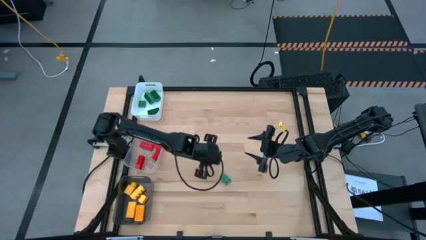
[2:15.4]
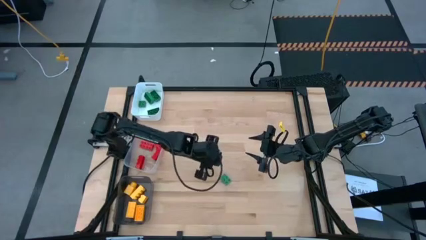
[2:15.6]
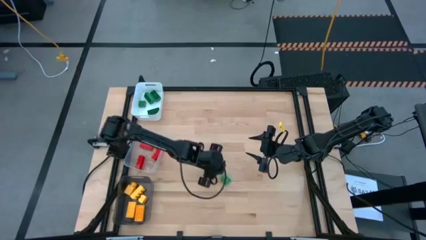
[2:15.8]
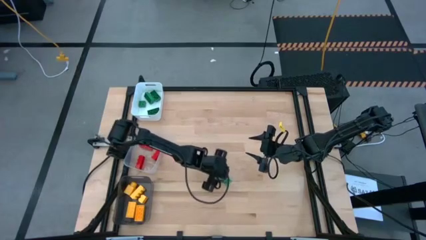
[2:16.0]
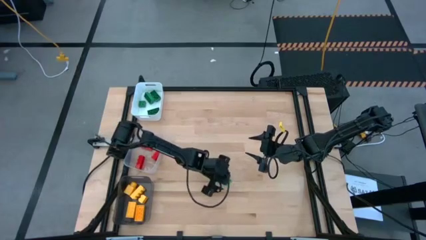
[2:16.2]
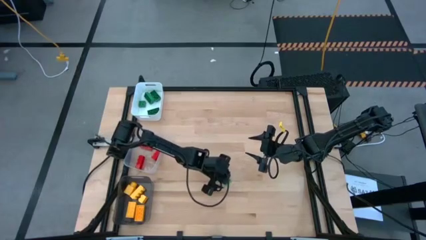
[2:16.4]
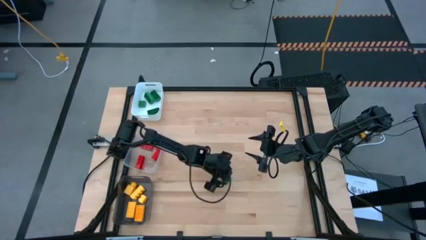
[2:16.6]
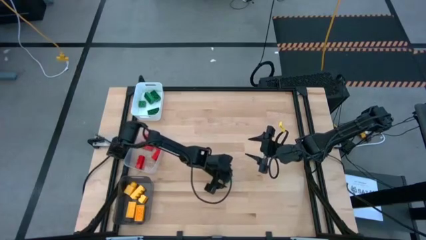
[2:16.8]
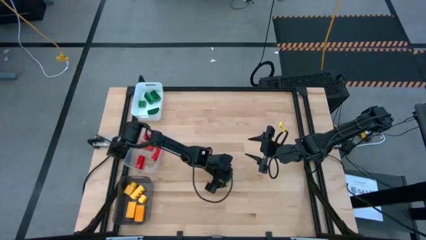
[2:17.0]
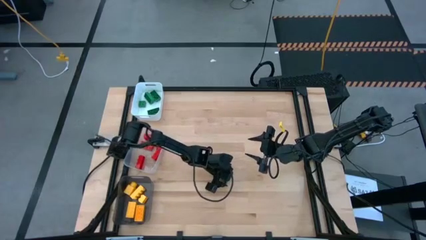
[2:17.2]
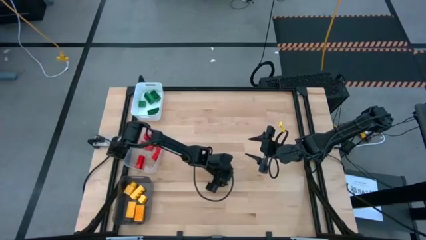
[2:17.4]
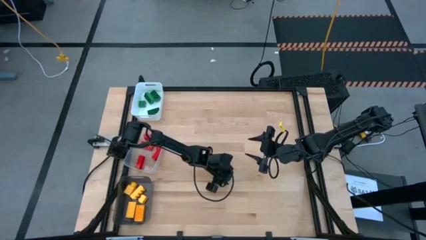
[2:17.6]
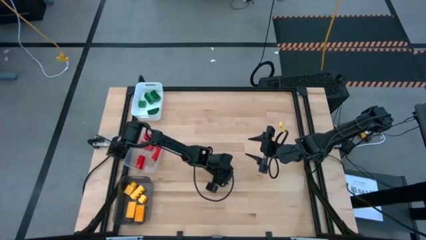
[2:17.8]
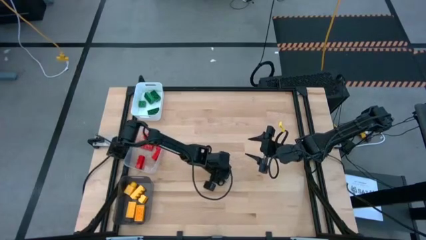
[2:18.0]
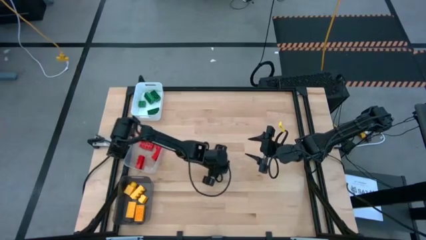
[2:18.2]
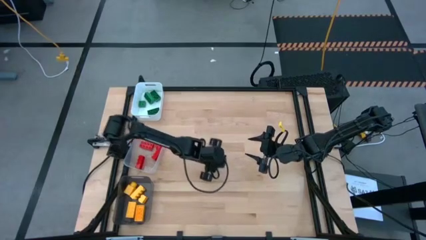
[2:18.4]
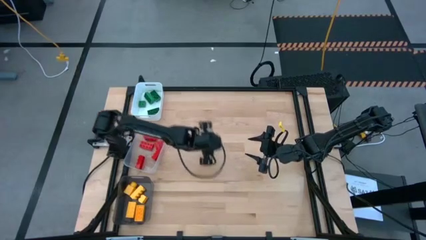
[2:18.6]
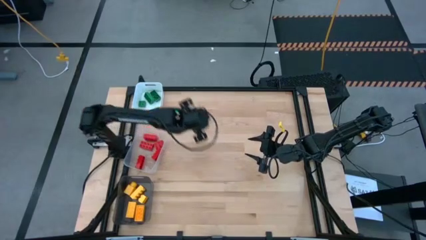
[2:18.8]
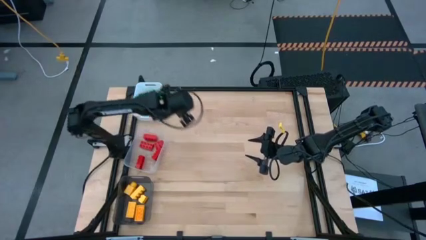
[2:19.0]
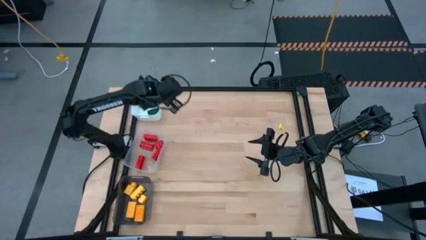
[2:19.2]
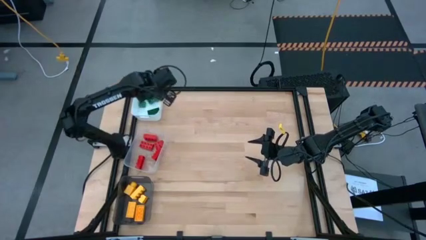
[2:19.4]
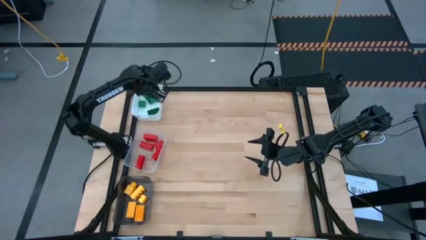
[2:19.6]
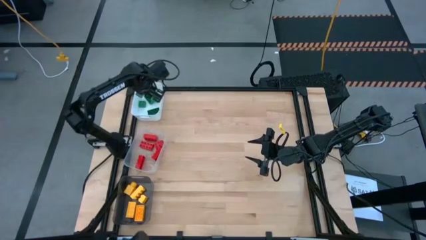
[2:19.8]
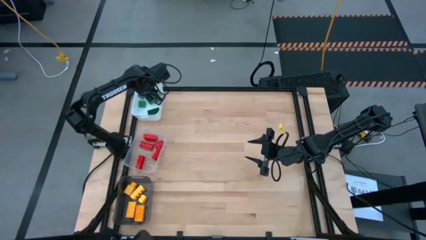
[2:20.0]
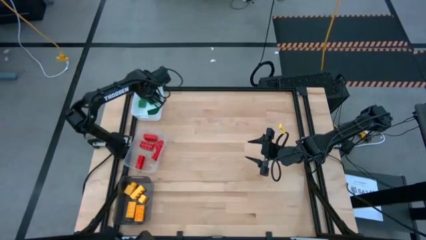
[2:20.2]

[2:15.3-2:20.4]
Task: Sort & place blocks by color
Put the green game piece into the white bin

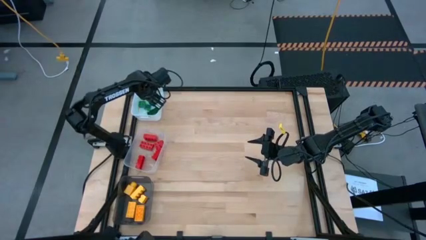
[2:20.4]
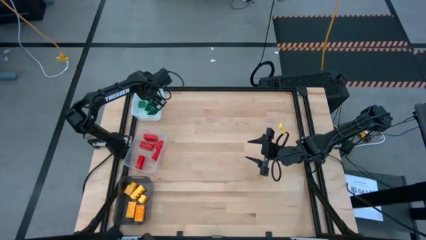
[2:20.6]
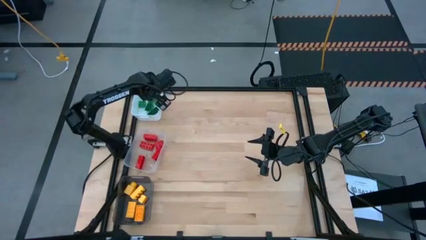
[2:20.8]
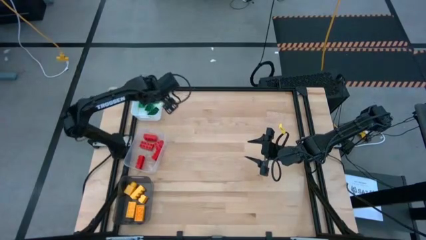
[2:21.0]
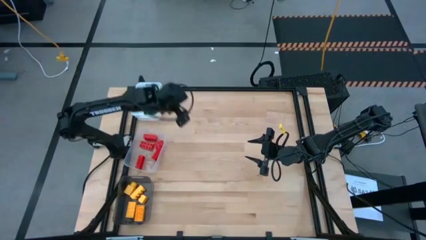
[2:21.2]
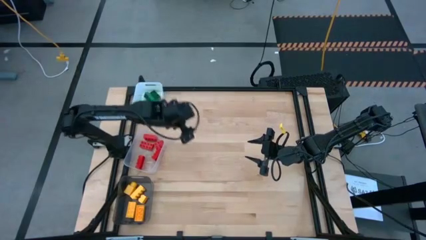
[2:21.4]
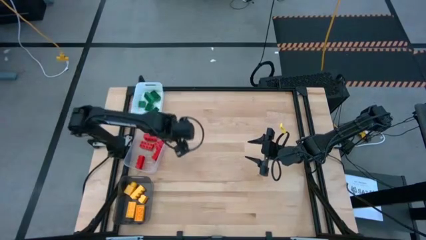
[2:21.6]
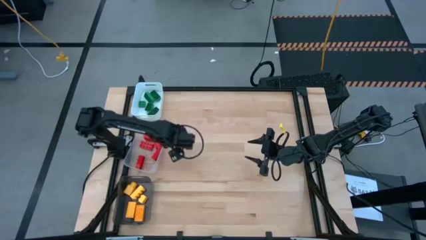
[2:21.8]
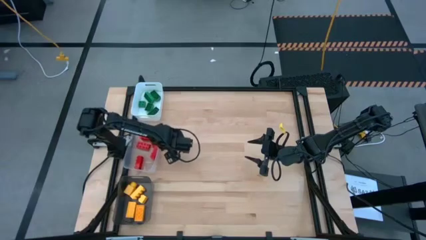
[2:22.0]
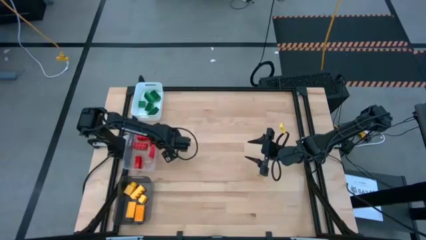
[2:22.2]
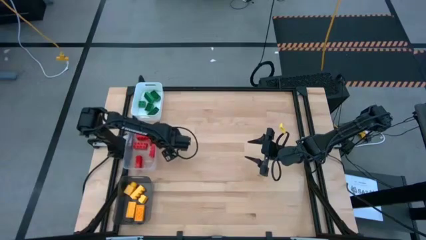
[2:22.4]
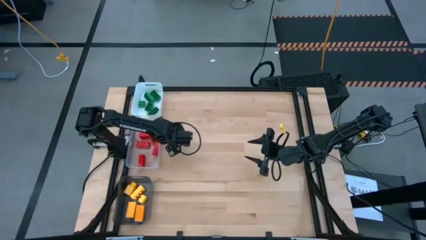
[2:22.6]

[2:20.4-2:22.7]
Adjust the transparent bin

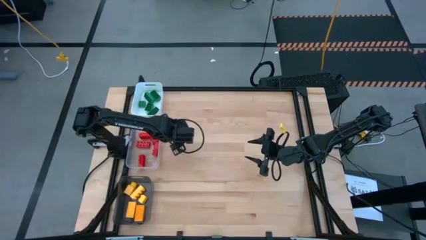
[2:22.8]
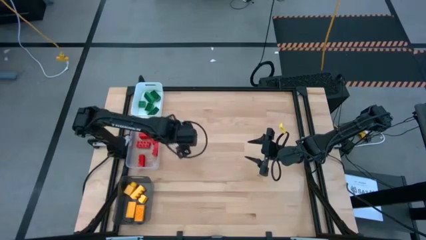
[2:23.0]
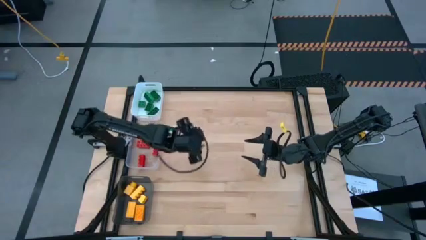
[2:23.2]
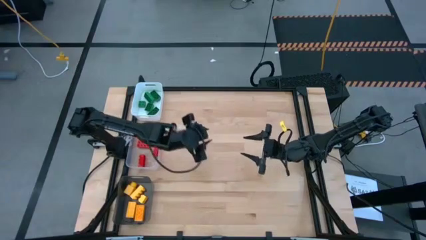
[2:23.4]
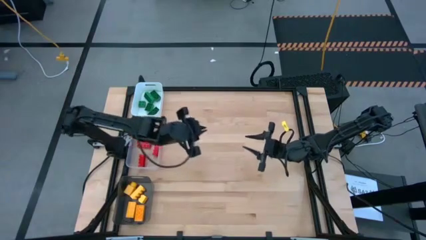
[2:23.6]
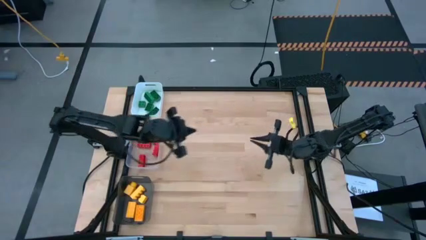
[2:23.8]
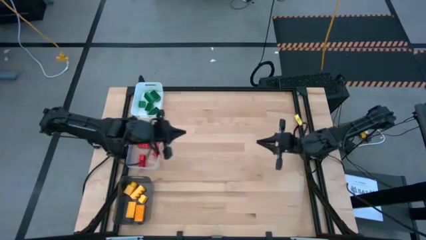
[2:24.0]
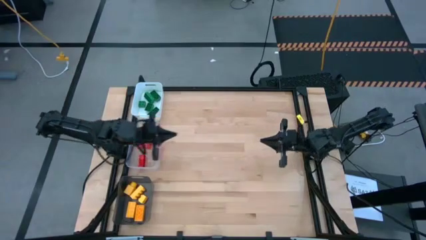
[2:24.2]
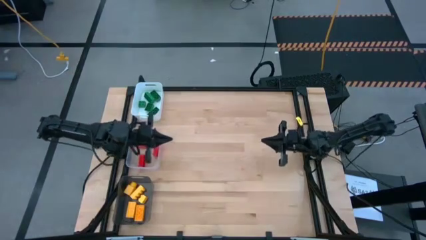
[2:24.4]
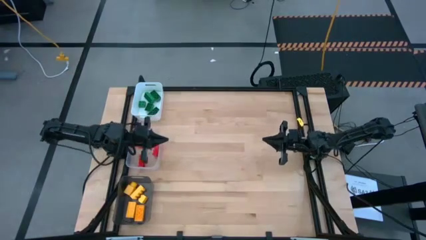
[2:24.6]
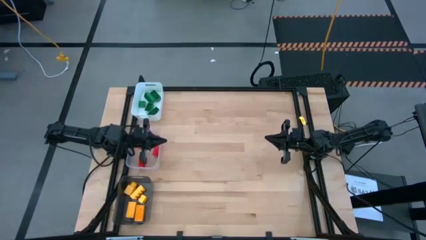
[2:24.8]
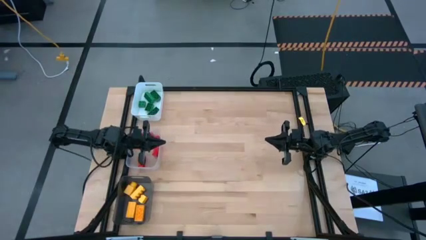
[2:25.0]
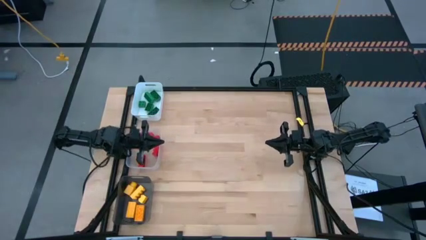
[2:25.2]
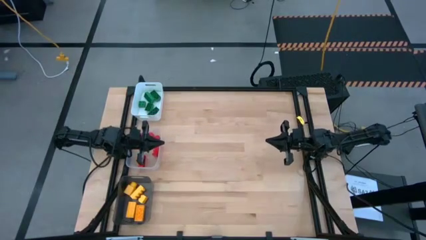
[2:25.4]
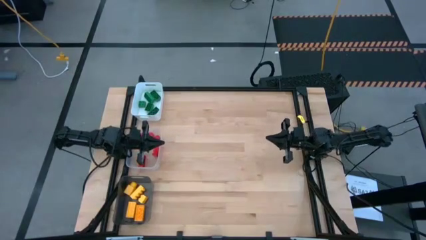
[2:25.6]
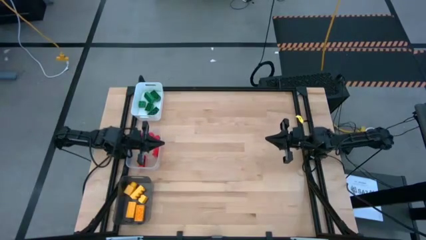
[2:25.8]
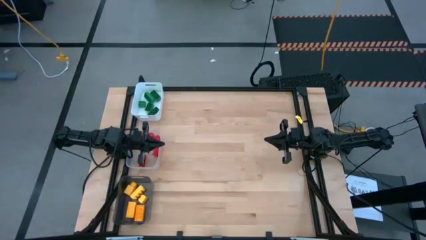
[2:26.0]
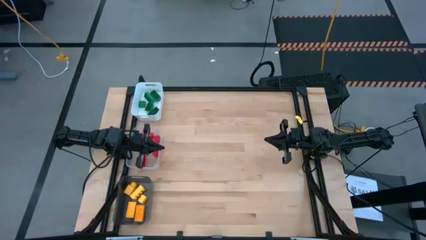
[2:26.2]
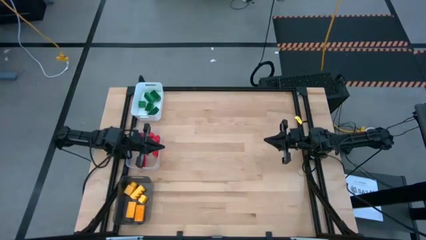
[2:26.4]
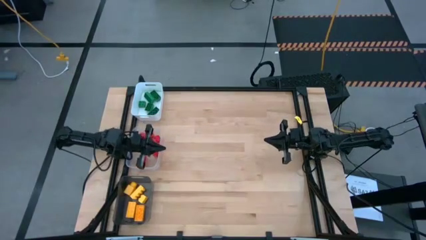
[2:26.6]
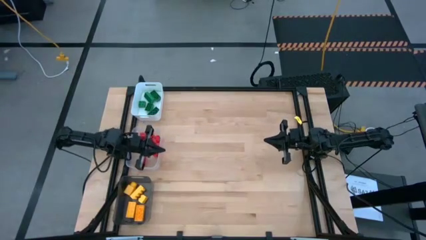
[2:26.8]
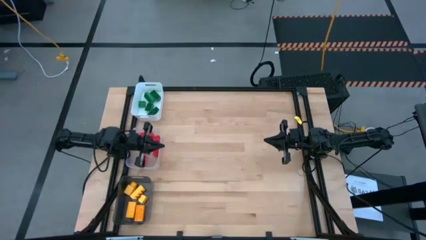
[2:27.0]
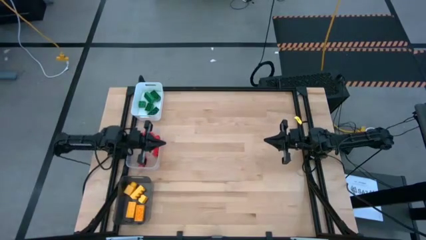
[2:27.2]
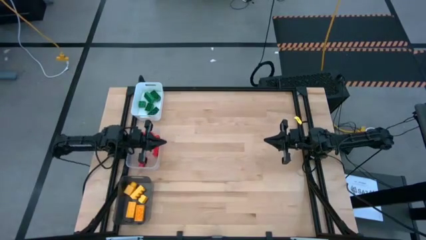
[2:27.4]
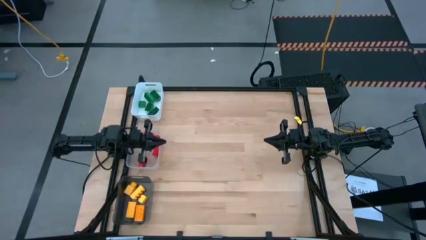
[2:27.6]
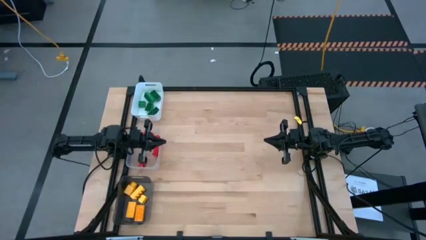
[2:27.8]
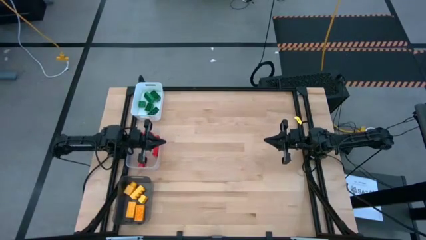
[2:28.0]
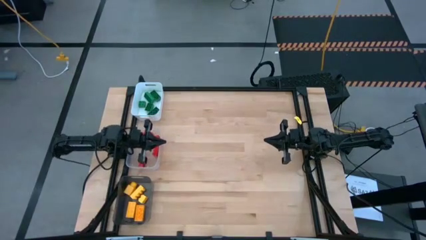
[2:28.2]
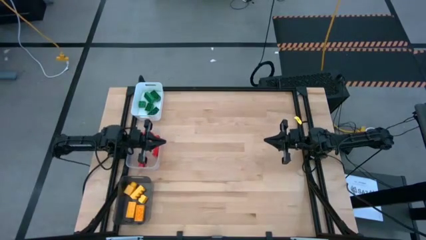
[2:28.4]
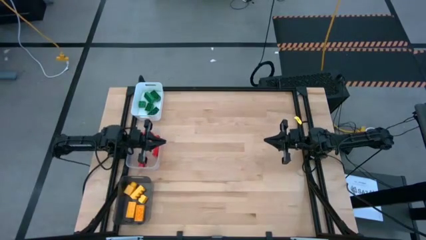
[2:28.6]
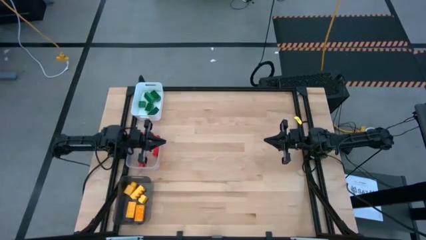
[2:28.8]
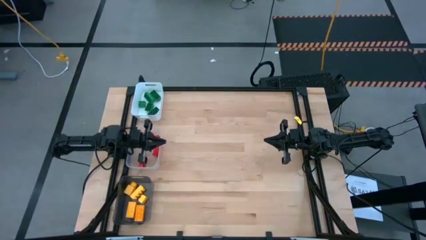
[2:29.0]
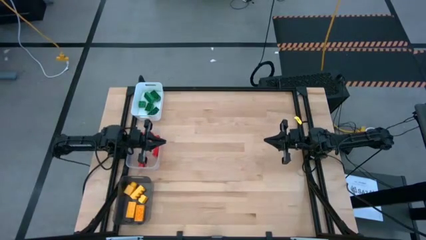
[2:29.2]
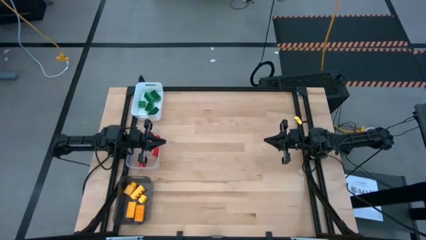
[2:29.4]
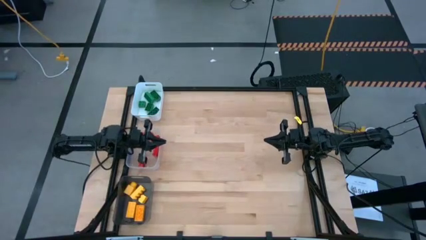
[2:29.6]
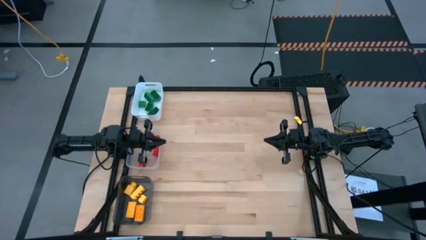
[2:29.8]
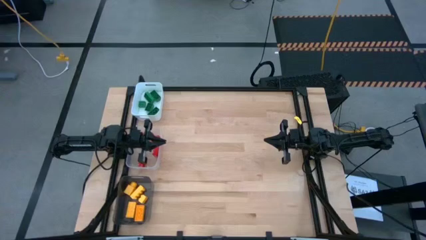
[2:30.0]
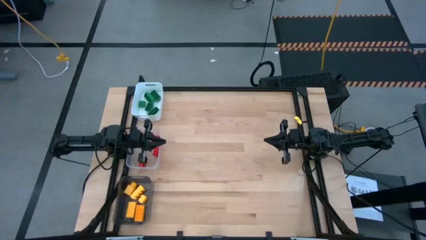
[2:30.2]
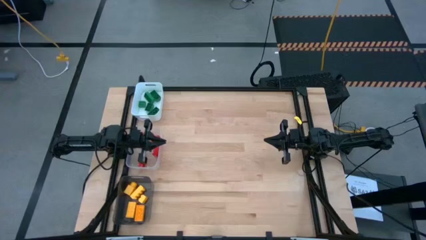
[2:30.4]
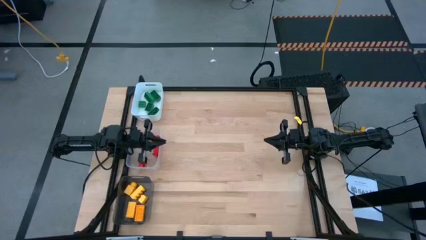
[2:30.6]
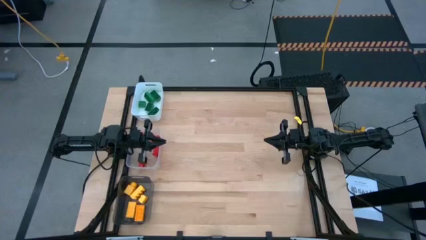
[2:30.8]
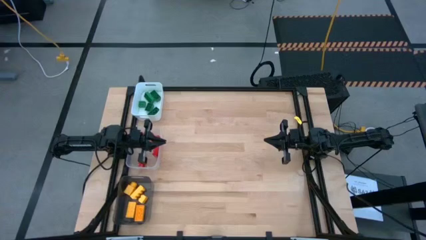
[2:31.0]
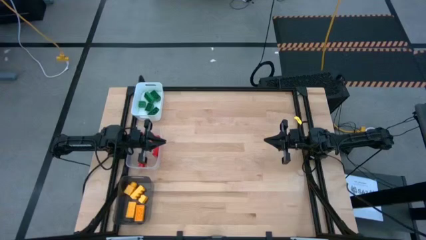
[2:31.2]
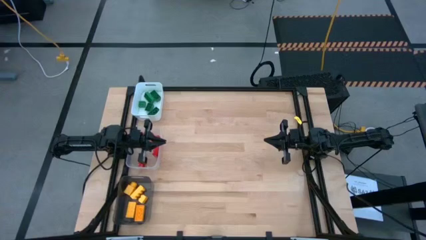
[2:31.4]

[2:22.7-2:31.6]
Return to Home Position

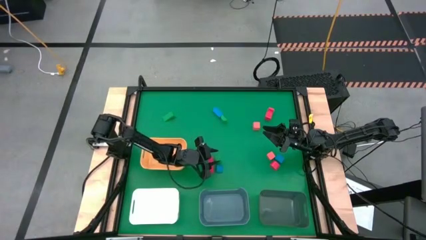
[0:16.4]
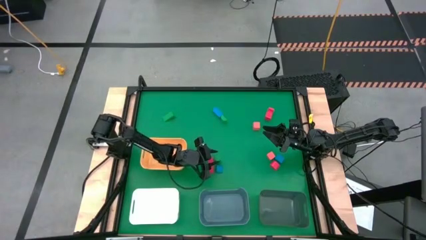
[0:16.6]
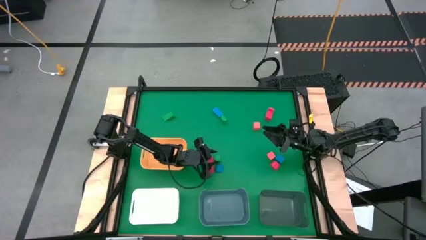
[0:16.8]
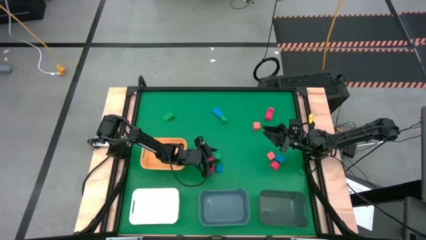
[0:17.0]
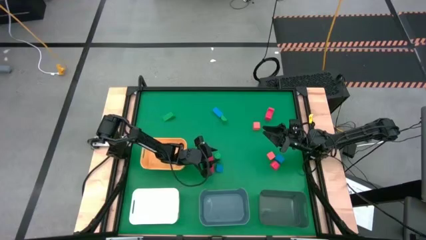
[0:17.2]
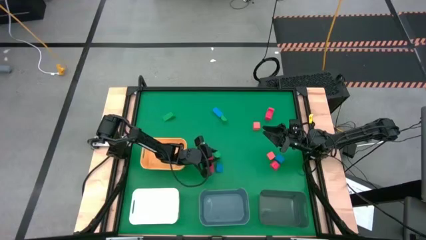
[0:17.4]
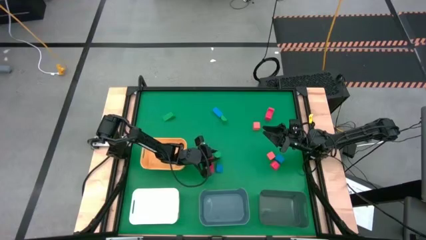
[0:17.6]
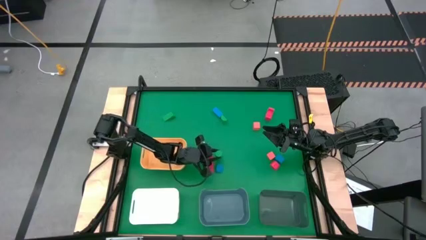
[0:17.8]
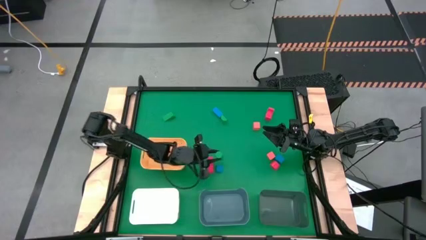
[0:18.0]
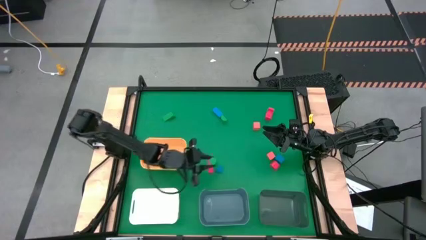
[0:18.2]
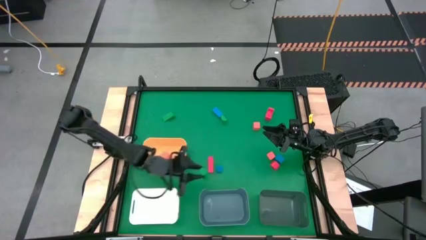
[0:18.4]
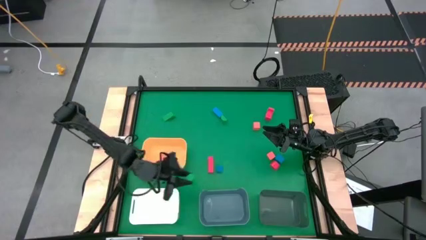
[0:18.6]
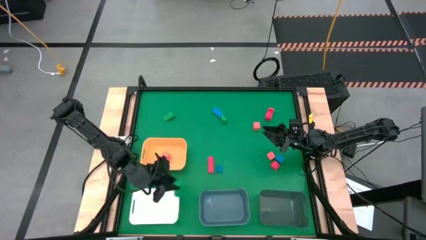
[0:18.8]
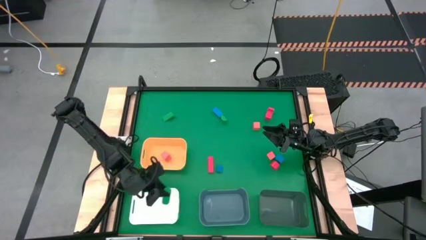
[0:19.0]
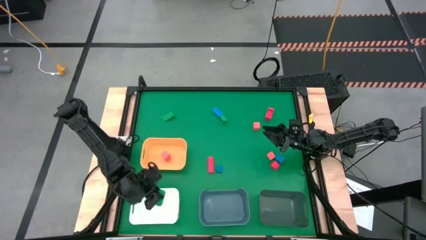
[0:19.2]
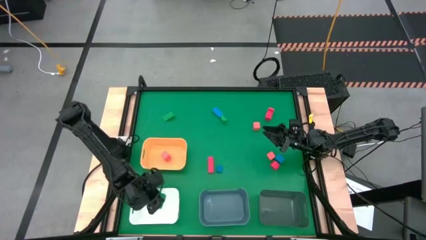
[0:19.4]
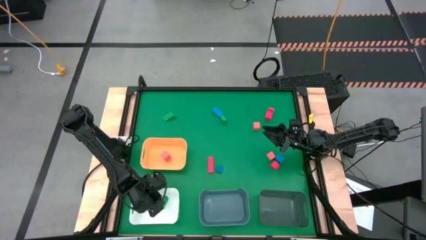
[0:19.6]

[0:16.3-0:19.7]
Task: Sort & place blocks by color
Put the bottom green block into the white bin
